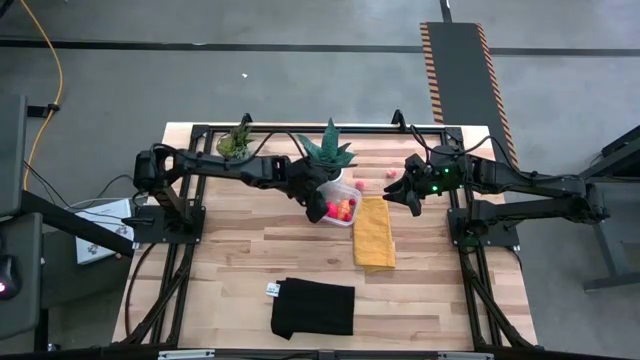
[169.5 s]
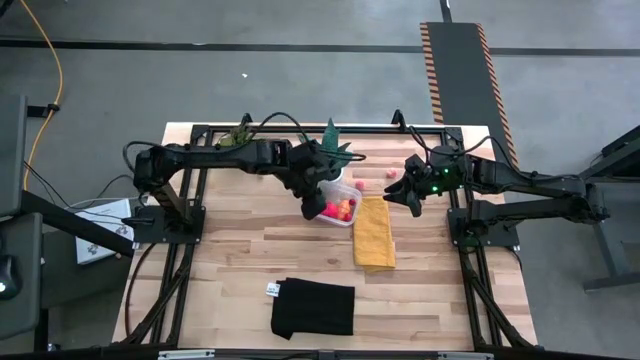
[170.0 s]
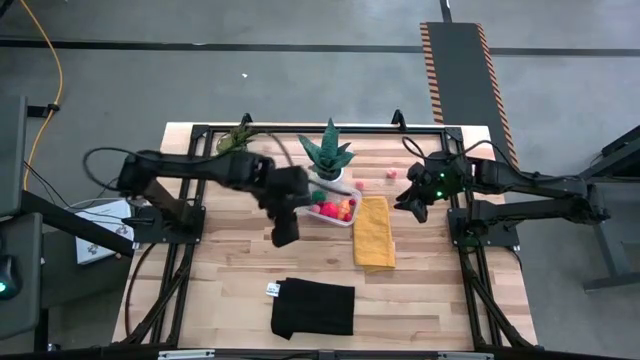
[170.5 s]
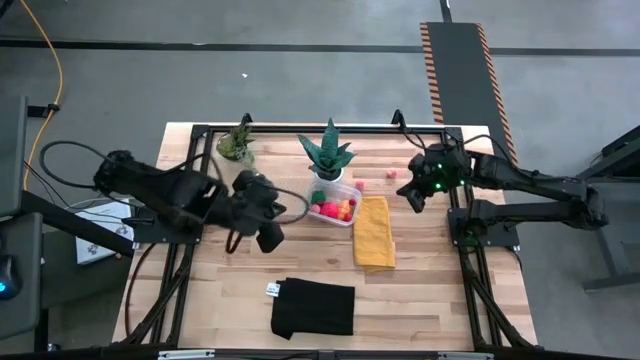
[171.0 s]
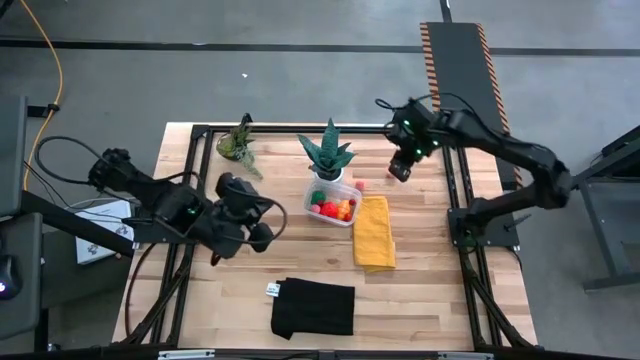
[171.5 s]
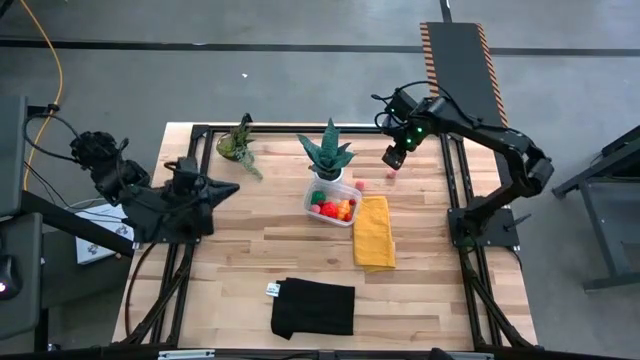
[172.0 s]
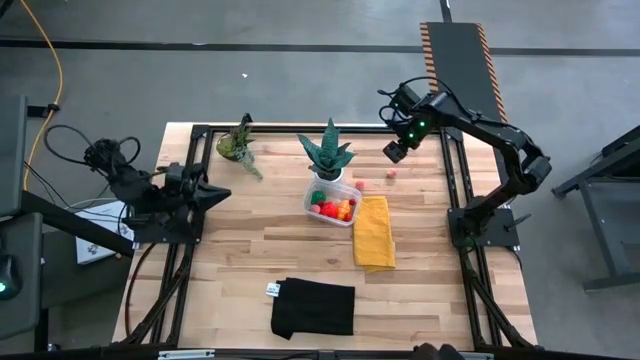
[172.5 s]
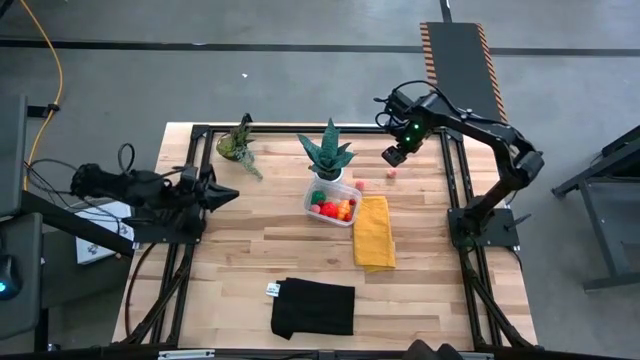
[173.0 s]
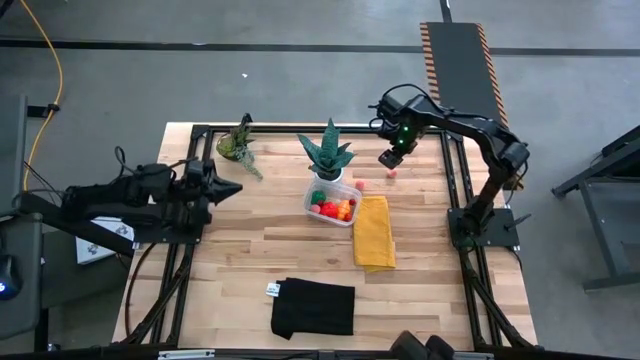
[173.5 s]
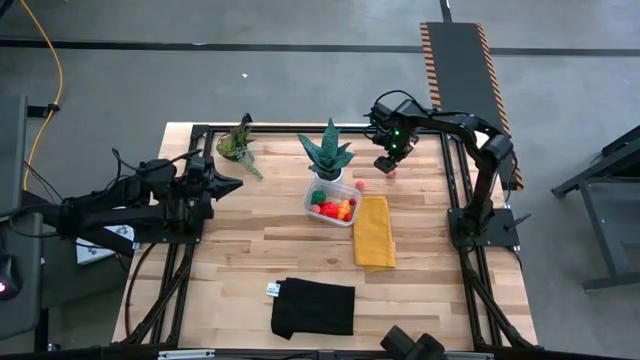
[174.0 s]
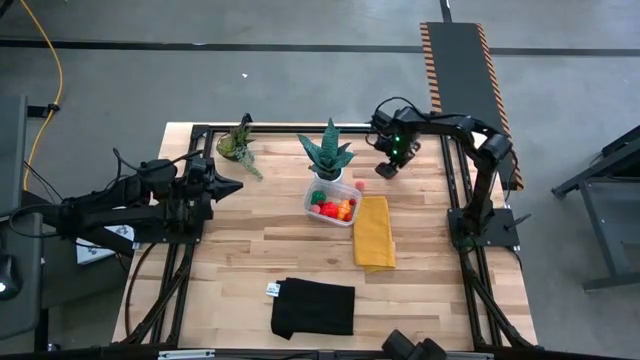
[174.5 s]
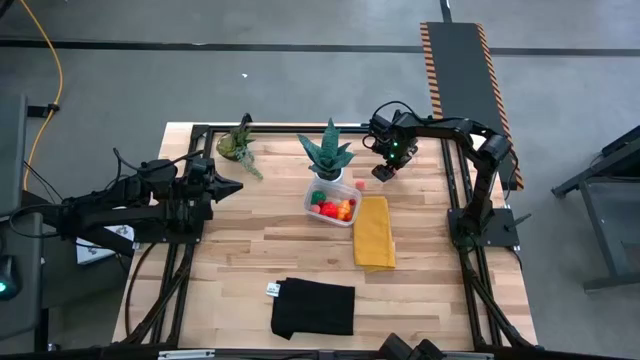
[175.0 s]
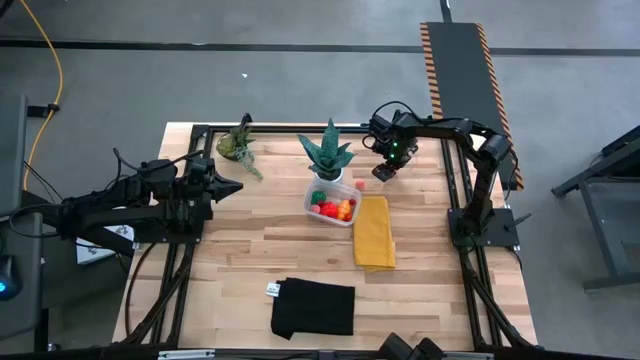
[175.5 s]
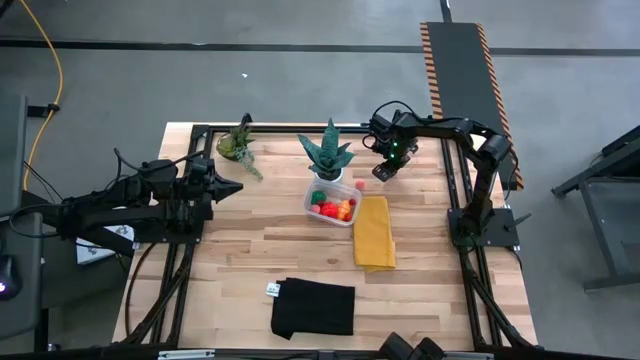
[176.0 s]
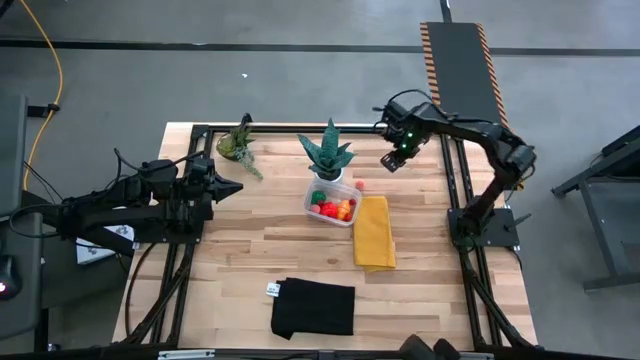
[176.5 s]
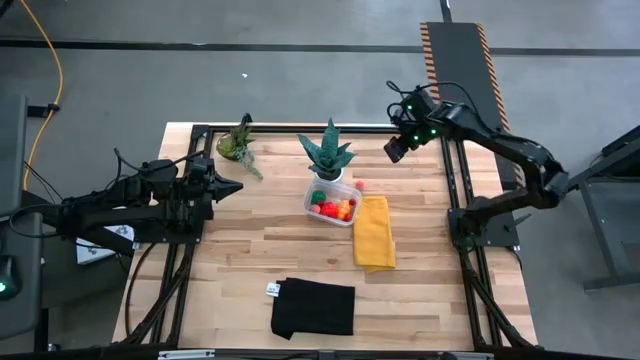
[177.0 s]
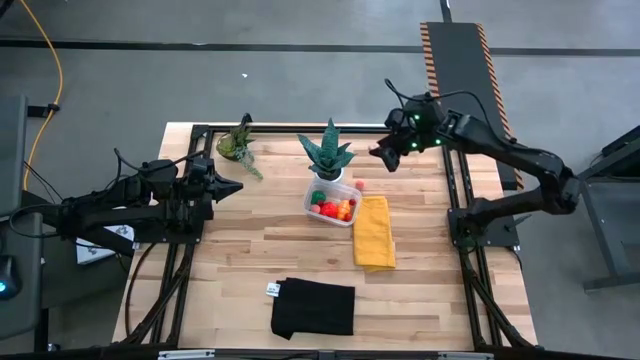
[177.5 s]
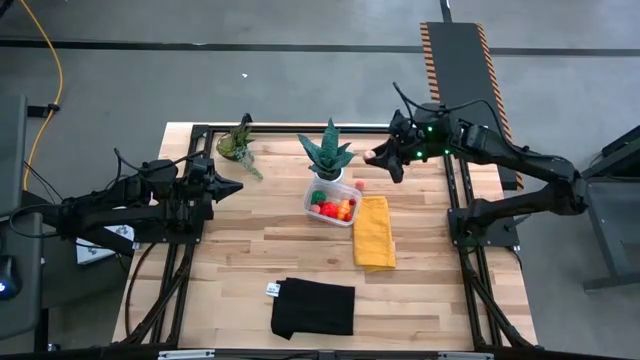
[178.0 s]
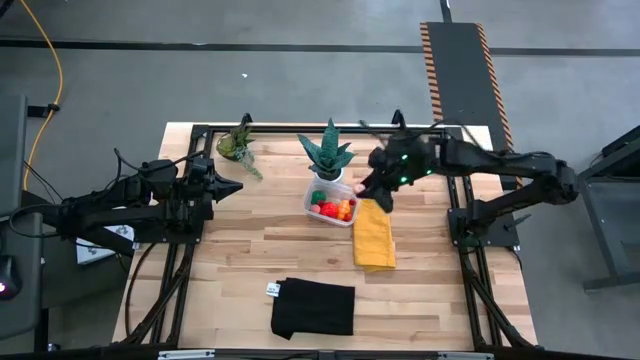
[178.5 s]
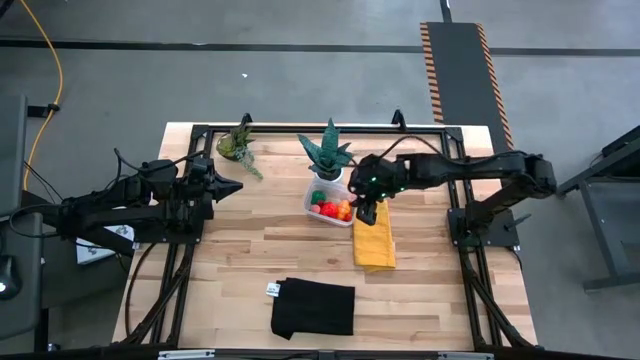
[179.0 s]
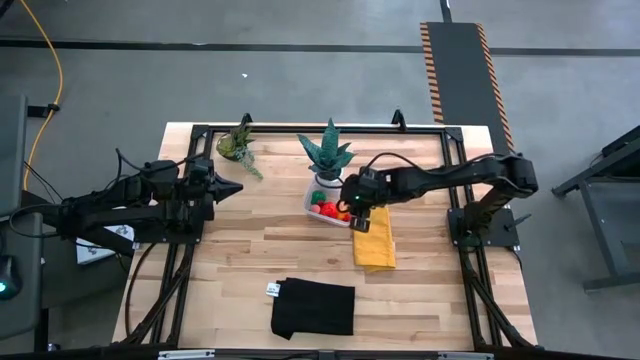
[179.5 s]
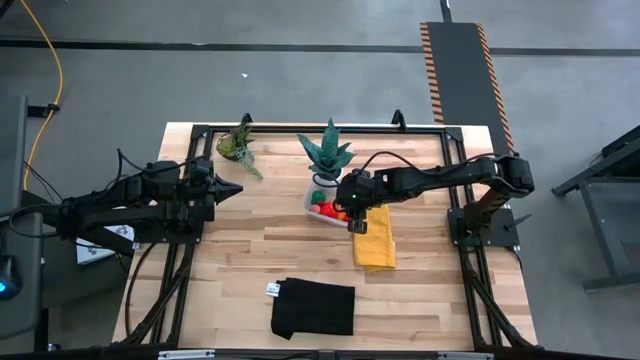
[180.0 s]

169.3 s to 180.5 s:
Task: Pick and placing Produce into tupperware
Put the top peach into the transparent container

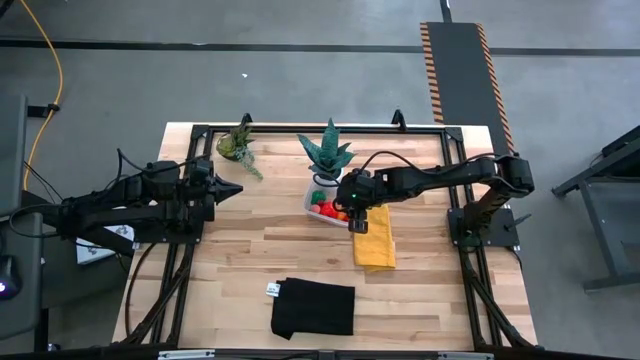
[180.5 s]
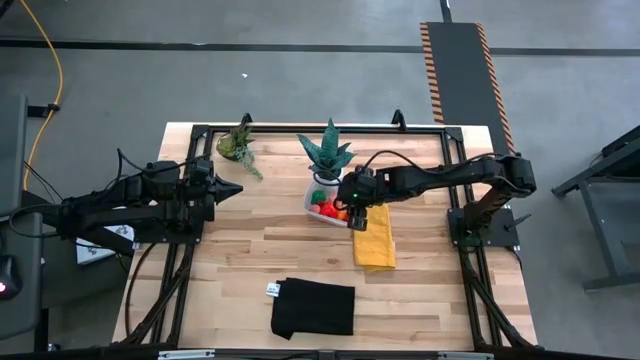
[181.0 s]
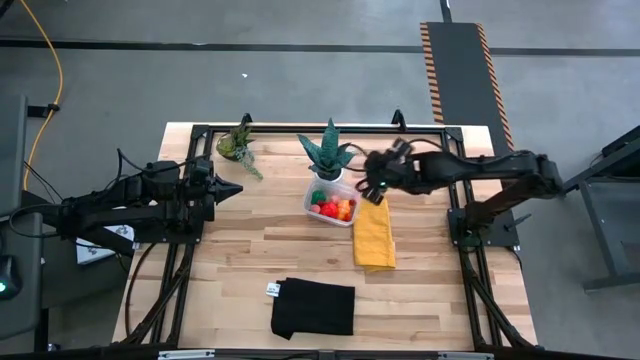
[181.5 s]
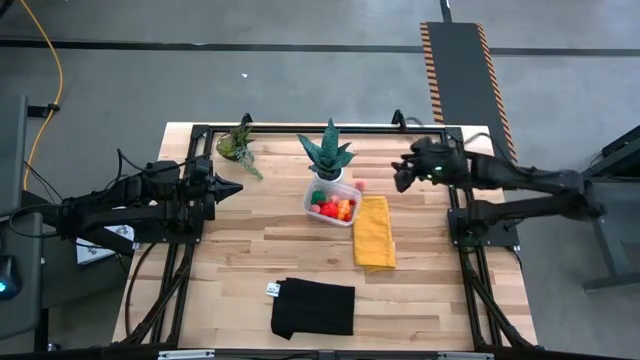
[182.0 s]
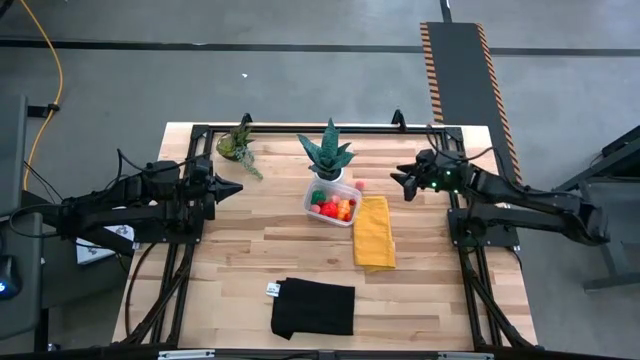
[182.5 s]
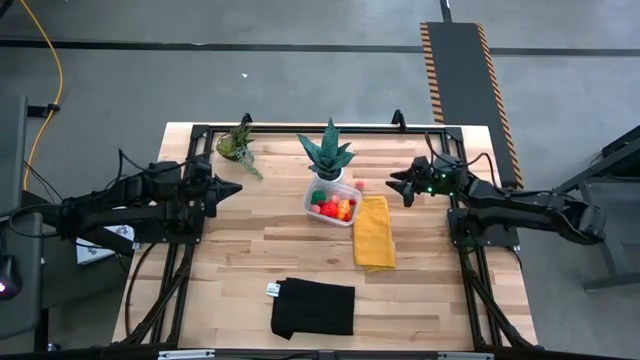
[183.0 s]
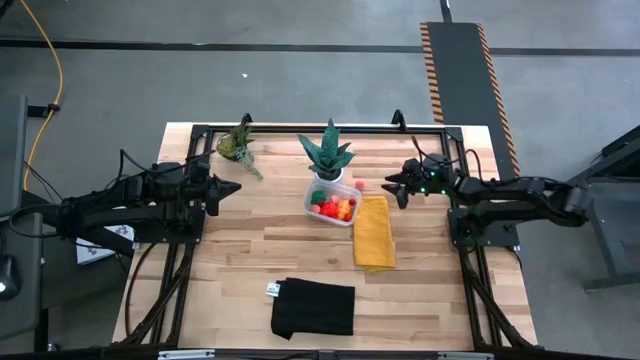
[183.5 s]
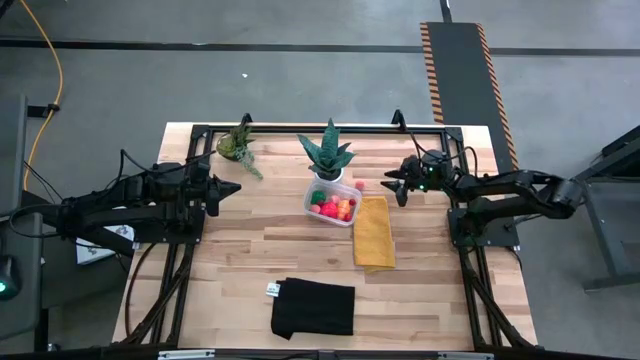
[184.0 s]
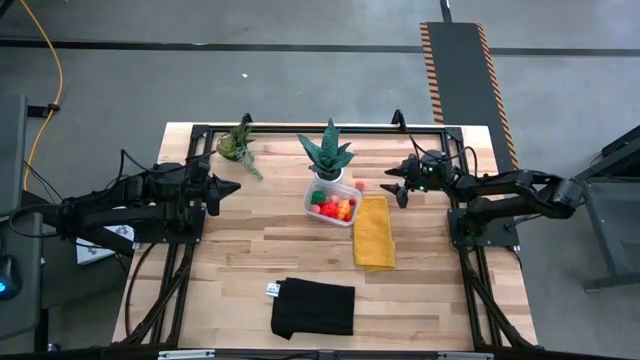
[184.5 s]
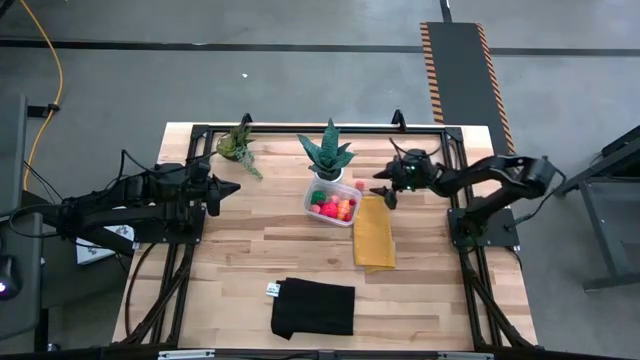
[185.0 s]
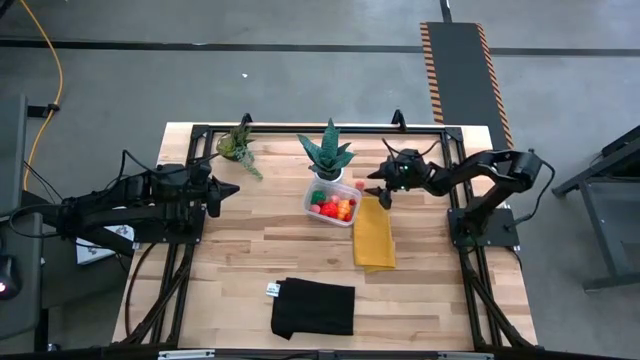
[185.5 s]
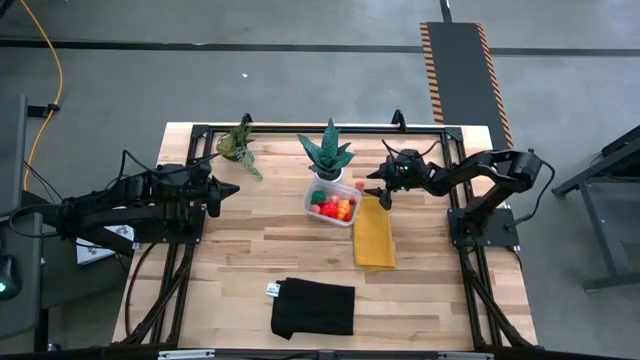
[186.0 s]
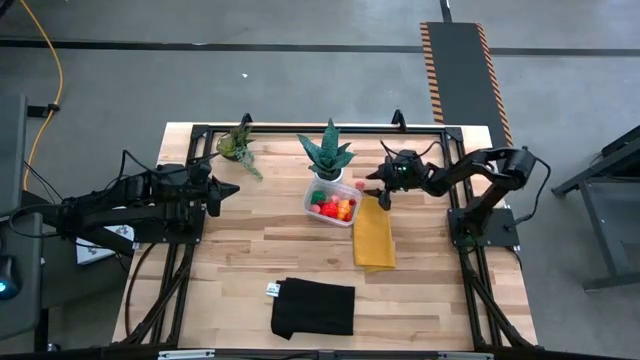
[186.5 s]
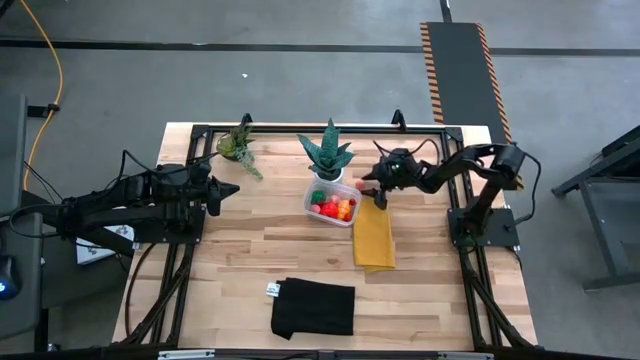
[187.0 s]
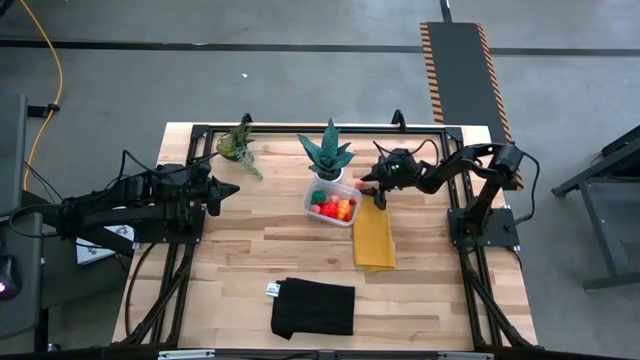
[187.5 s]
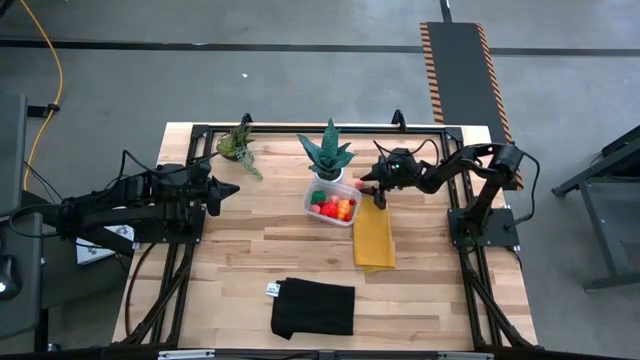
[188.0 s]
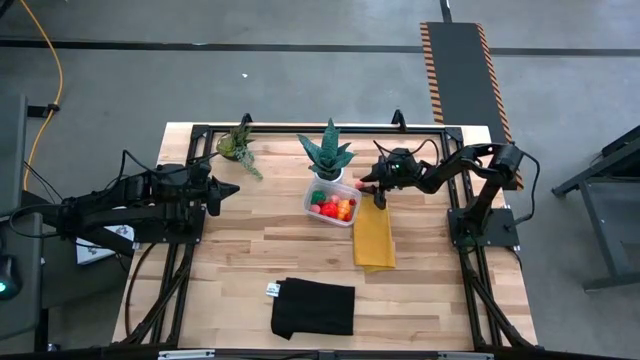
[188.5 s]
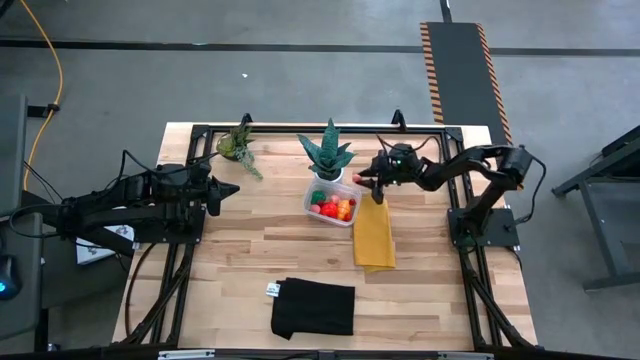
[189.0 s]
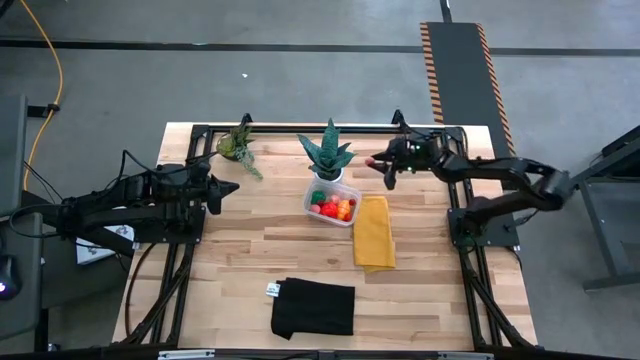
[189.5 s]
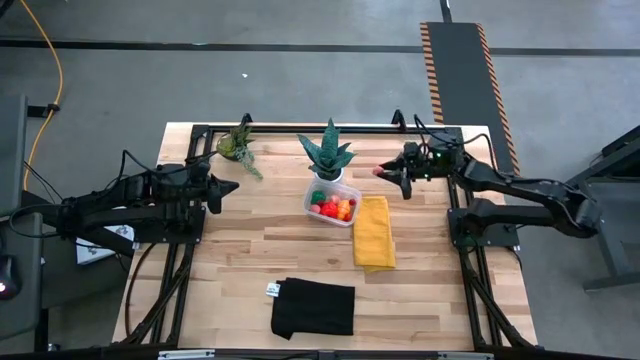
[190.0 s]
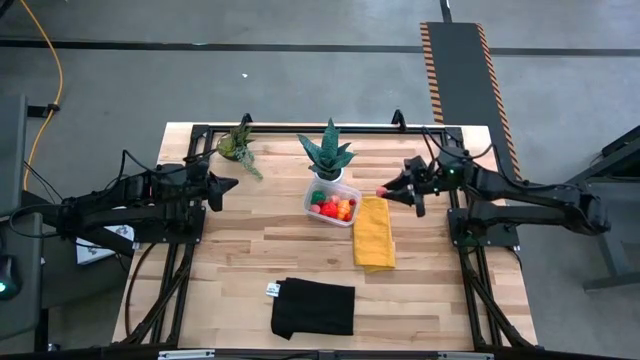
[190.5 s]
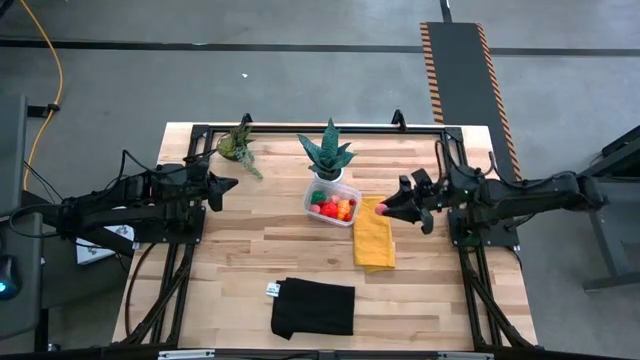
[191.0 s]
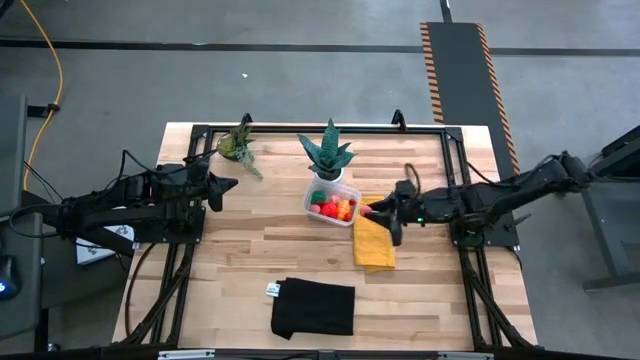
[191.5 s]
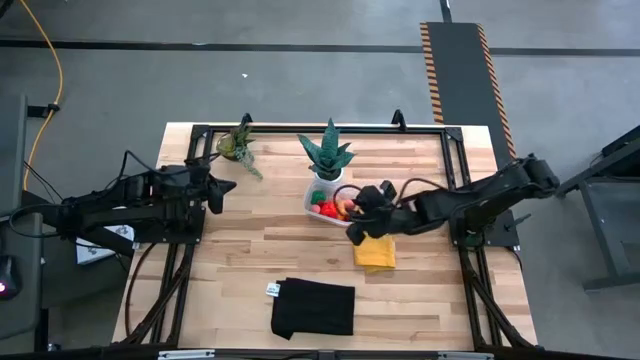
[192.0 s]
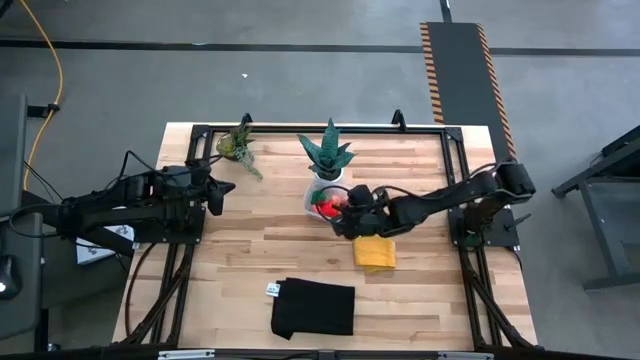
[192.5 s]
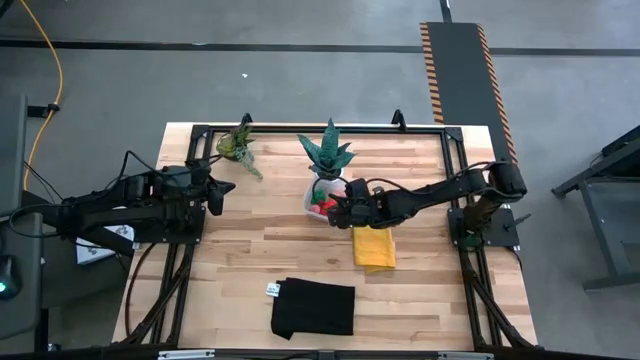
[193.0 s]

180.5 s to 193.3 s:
Put the pink peach into the transparent container
